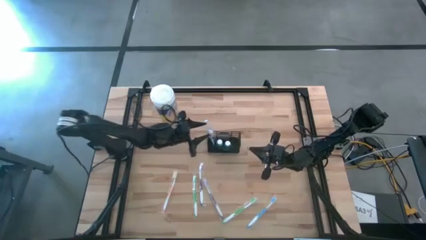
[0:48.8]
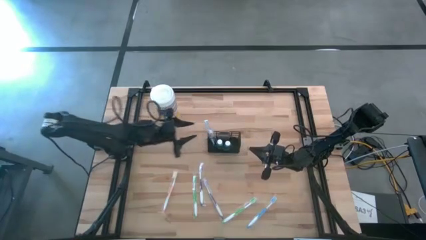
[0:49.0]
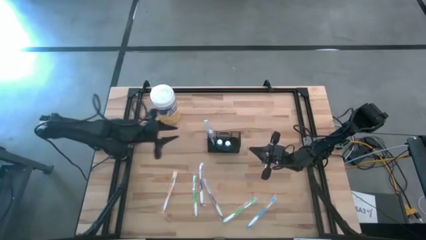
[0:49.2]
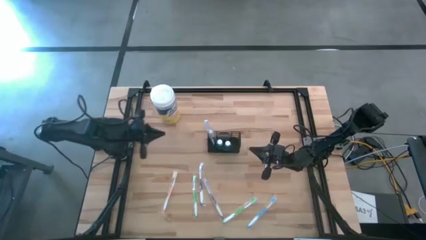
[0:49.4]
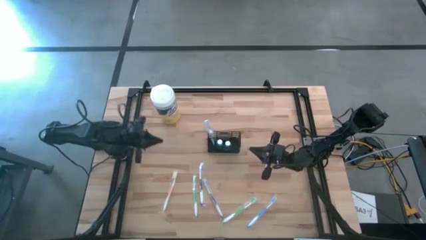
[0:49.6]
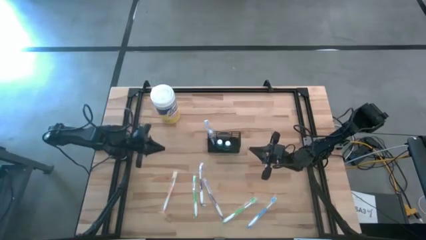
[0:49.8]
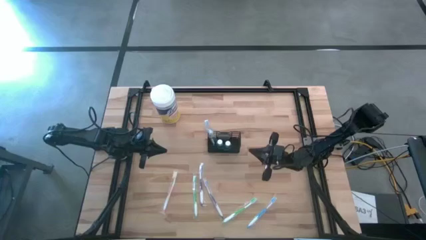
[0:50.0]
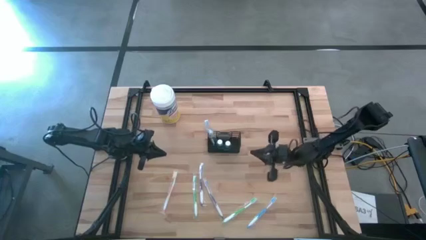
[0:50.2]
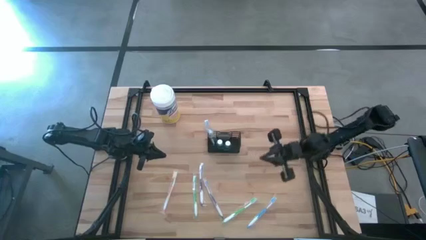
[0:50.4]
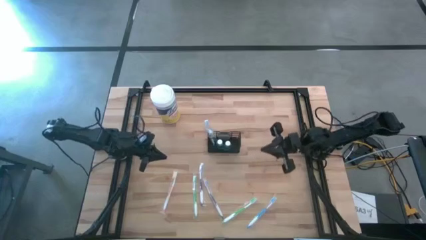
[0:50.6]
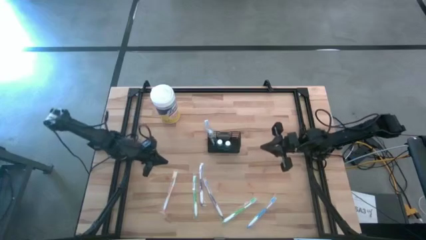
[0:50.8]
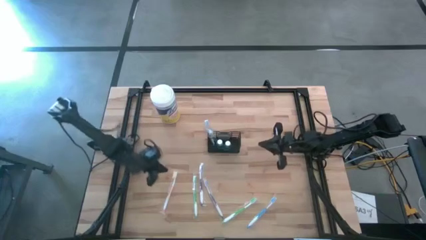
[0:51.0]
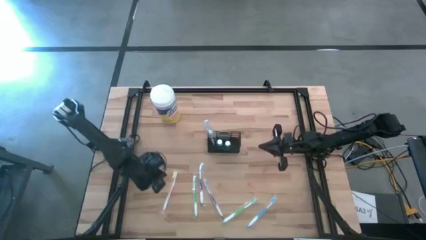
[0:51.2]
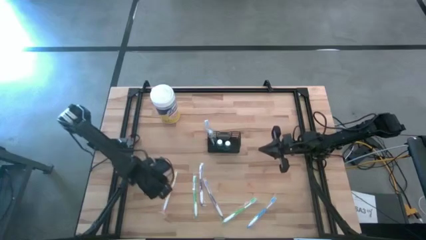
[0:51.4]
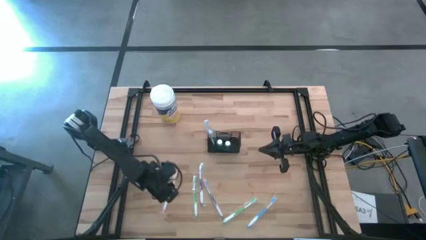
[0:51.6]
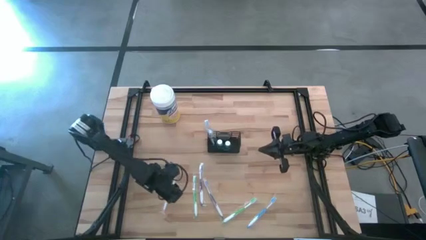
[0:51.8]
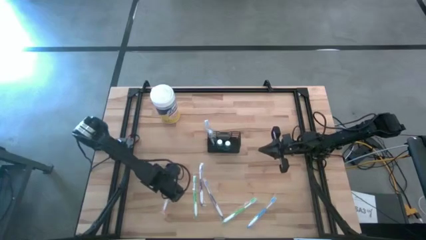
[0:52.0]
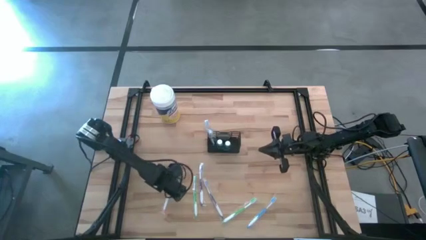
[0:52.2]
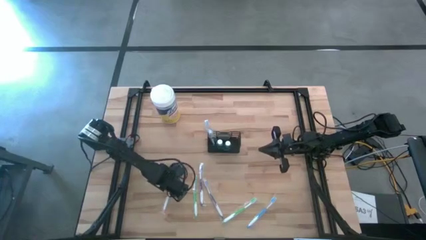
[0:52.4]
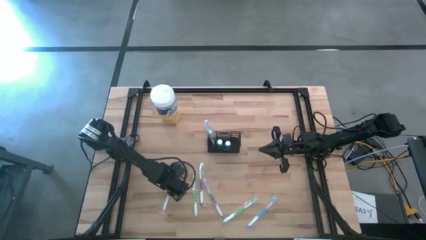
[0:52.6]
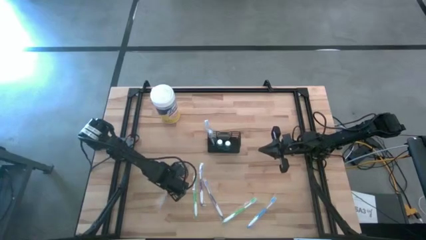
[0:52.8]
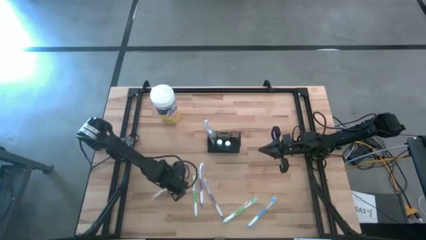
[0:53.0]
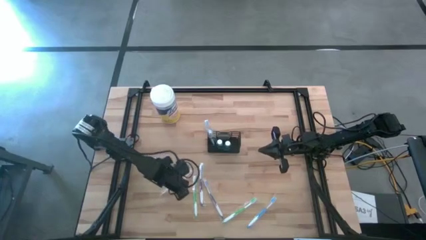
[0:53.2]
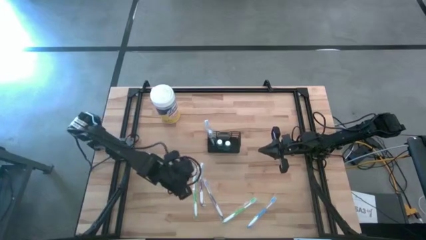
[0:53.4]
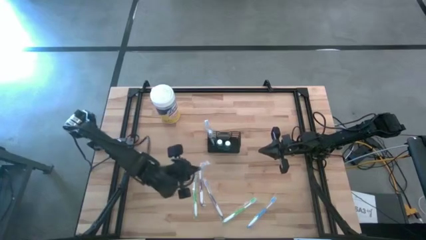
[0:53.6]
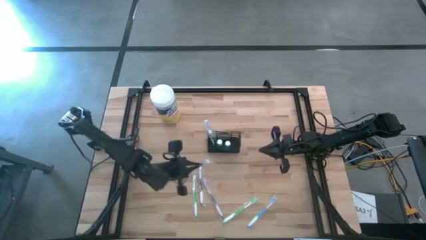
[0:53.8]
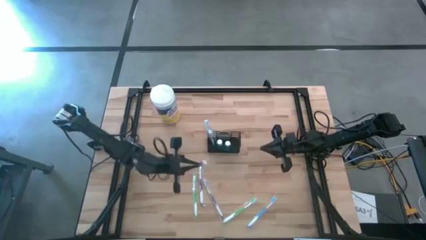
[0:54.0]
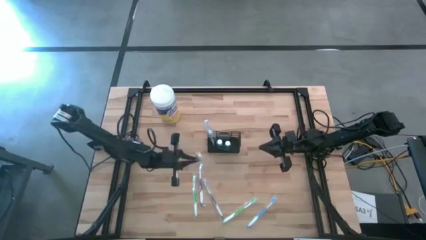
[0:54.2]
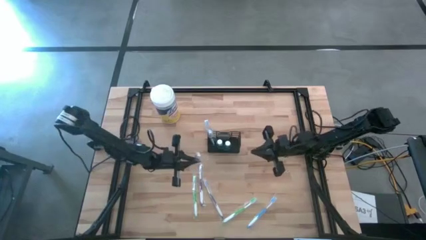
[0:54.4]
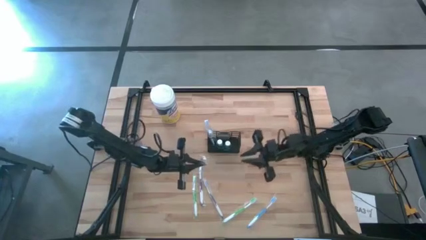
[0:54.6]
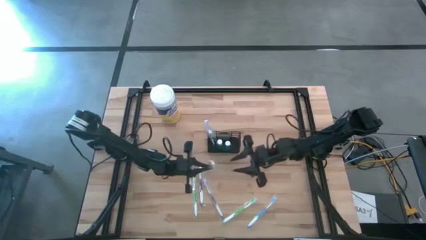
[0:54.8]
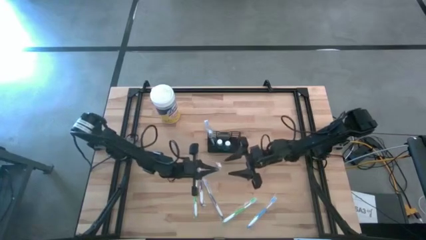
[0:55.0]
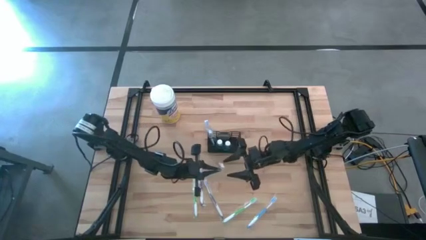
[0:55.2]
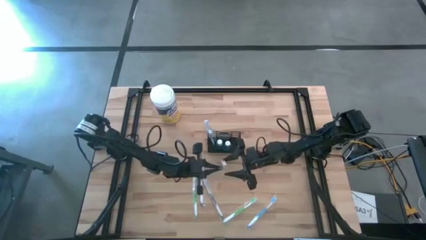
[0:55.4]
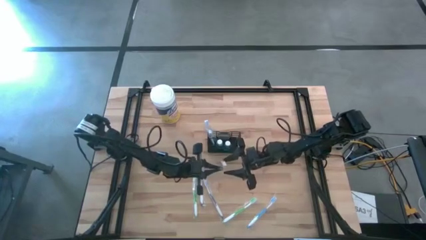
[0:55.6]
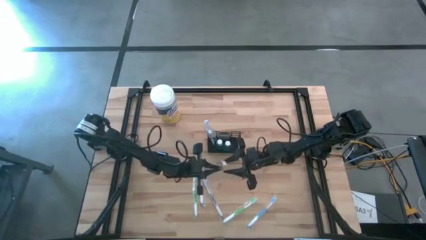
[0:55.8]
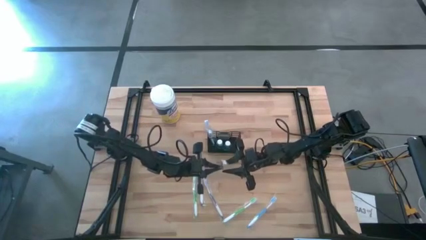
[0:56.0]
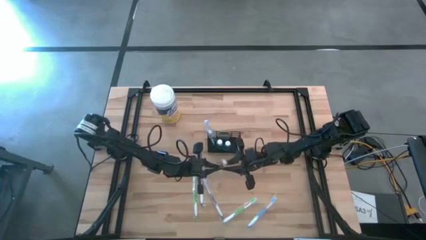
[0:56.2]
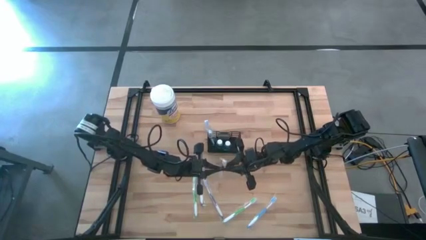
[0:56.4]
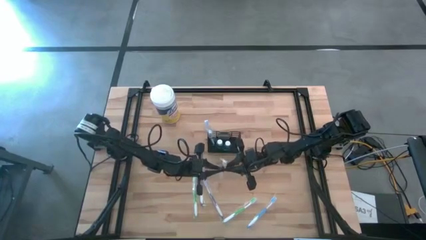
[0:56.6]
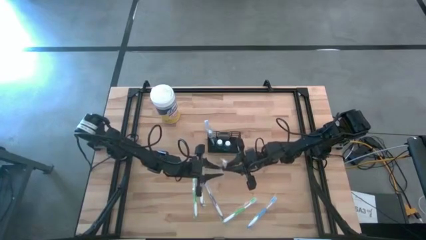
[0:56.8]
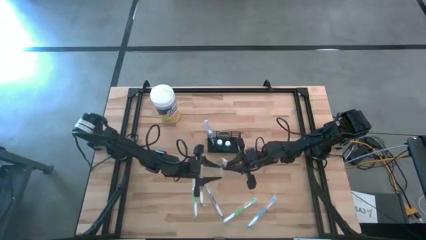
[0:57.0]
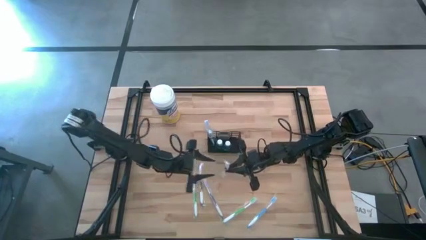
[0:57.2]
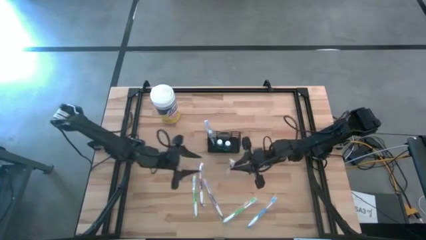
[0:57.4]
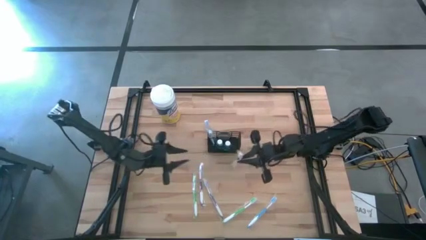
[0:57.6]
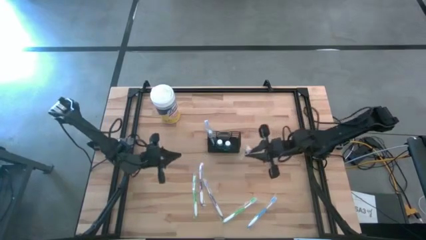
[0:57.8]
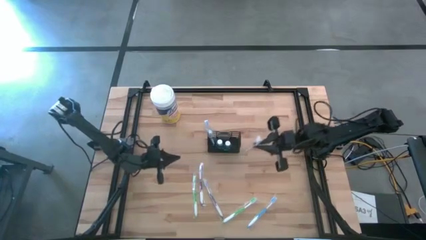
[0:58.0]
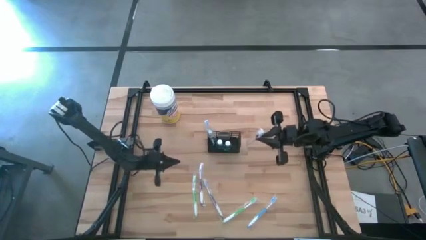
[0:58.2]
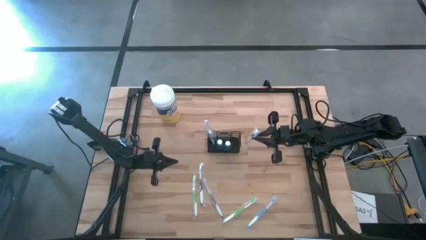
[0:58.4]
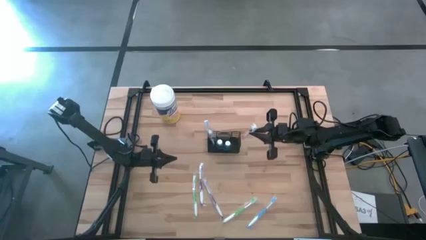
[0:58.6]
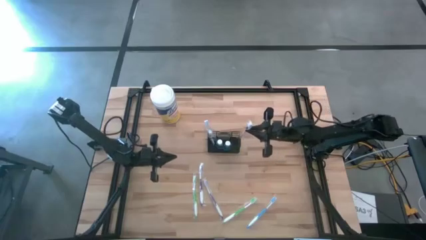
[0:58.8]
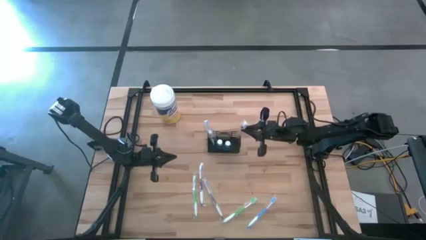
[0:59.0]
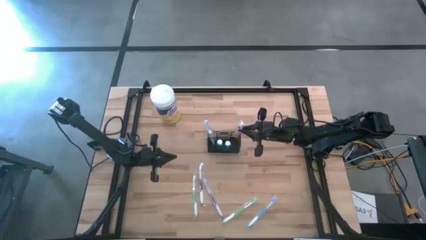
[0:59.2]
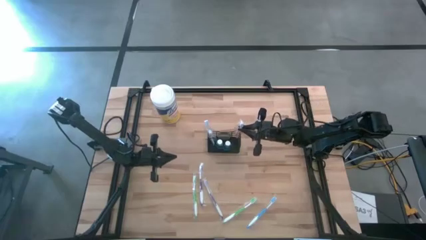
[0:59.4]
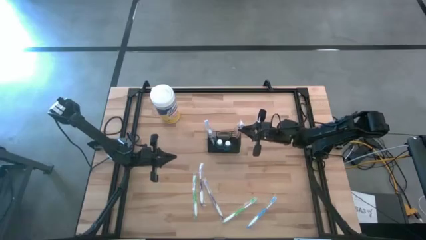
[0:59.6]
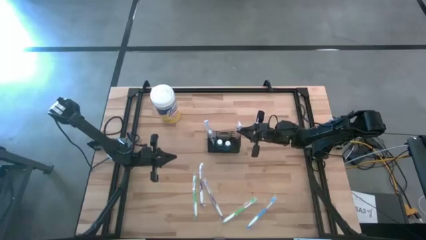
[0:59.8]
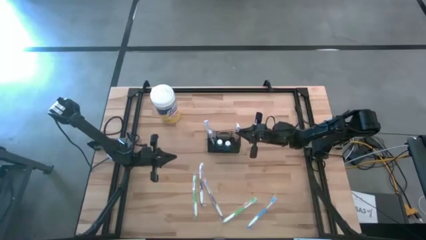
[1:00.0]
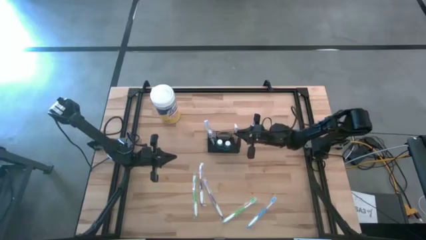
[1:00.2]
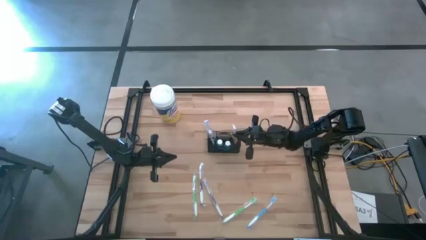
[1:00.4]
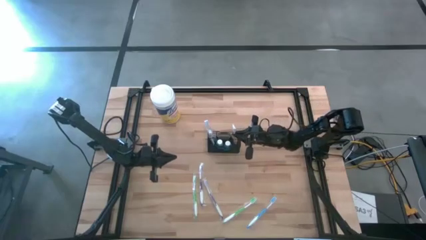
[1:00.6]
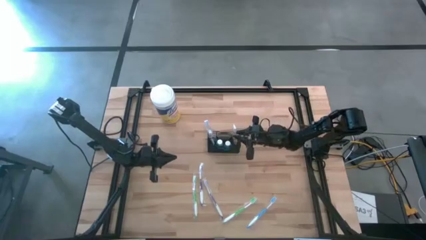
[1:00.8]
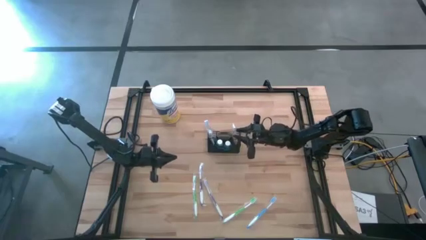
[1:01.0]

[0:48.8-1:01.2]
Task: Pick & Place toothbrushing station
Put the orange toothbrush into the black mesh organizer
